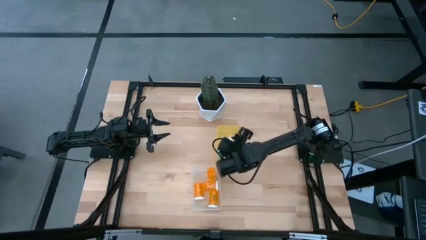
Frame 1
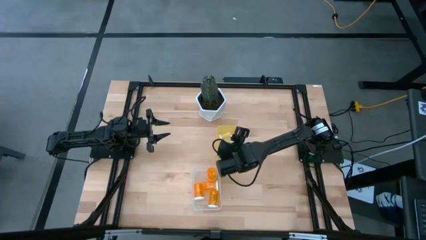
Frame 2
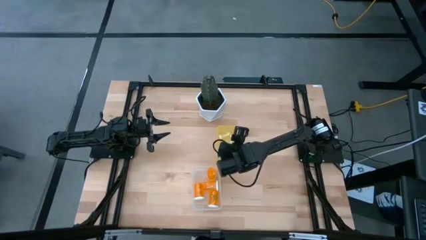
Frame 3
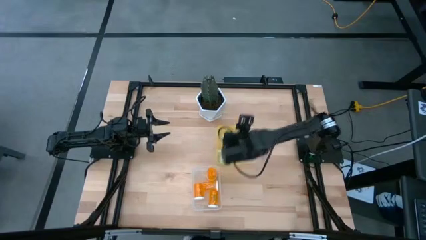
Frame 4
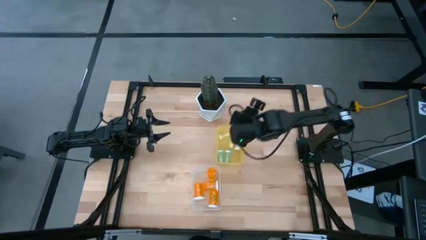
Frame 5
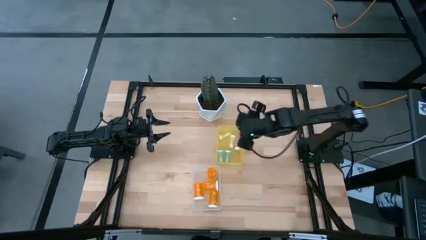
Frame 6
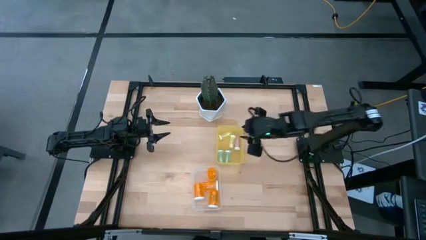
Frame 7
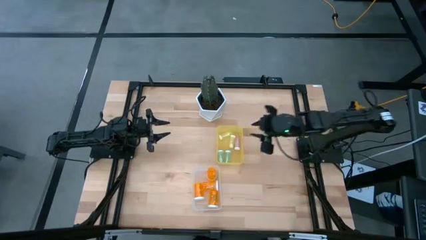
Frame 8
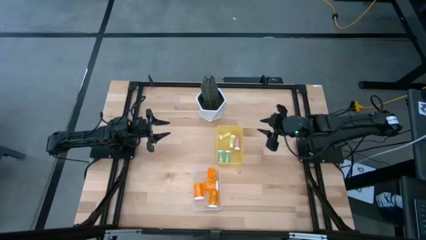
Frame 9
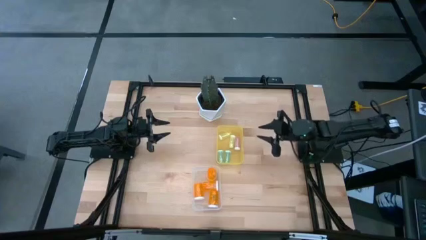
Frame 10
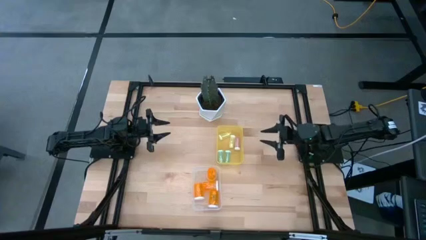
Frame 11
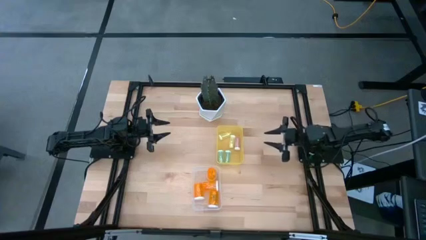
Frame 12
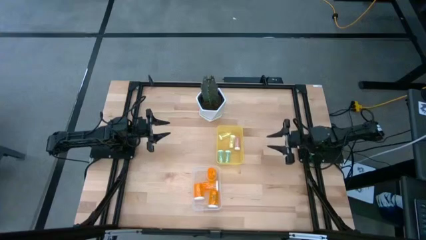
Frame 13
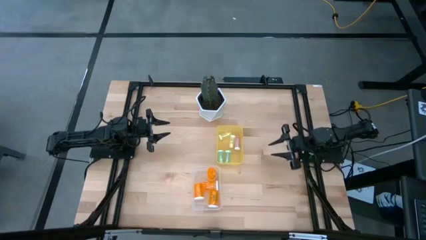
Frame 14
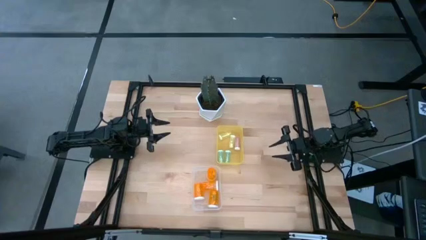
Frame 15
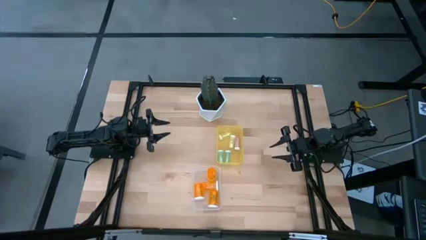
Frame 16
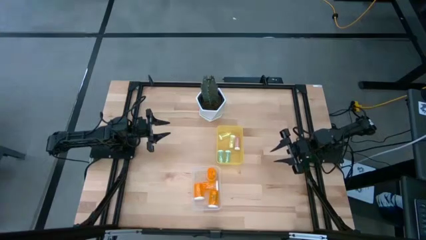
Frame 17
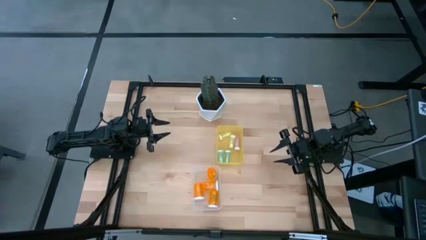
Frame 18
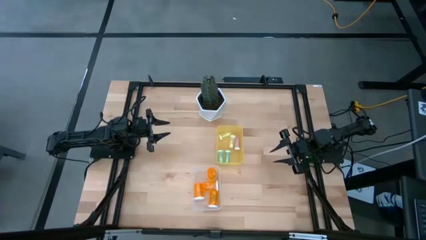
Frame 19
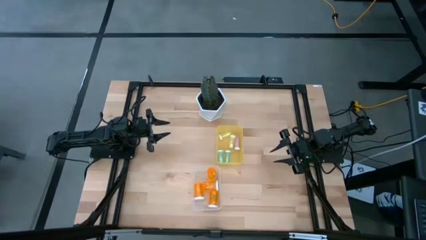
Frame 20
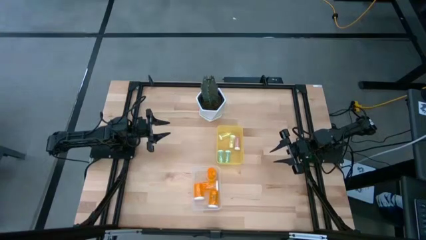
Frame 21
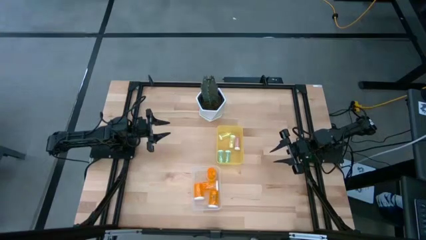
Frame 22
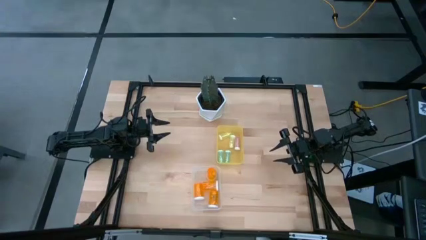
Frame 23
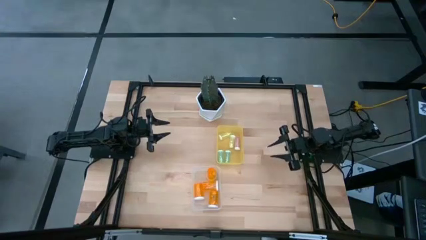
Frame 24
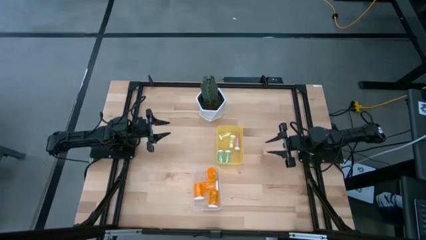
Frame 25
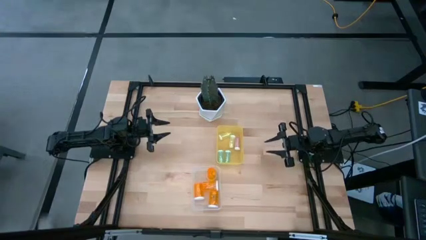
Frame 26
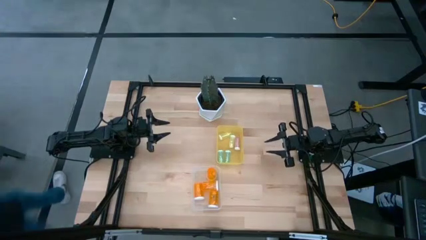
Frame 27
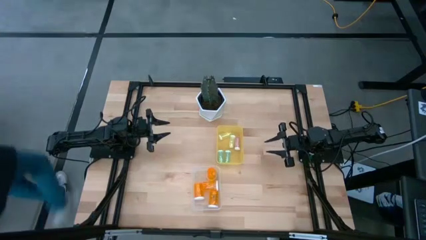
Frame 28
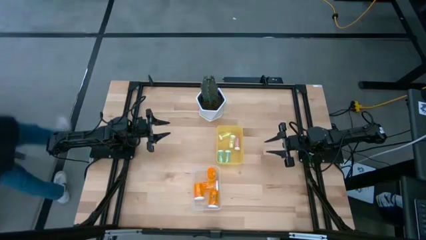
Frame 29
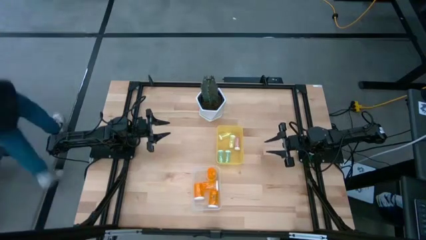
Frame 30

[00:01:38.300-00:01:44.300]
Task: Pick and place medicine bottles into bin by pill shape (circle, oval)
Return to Home Position

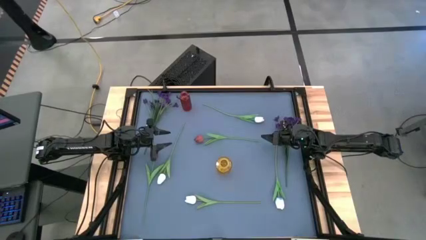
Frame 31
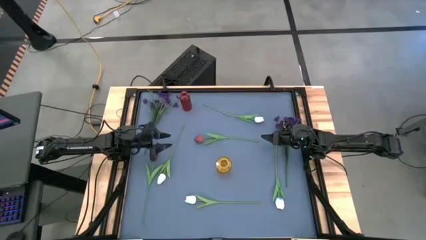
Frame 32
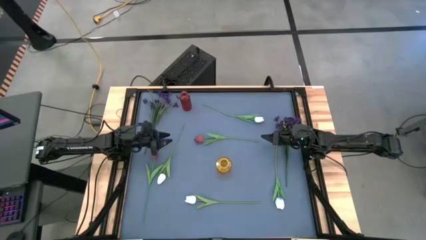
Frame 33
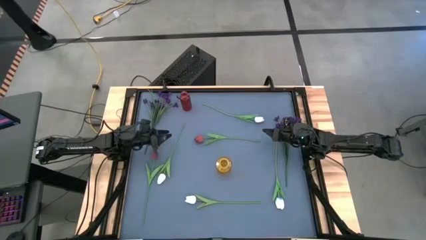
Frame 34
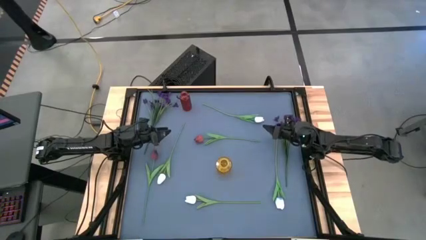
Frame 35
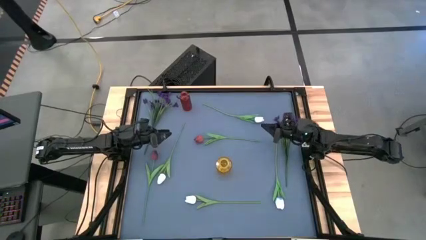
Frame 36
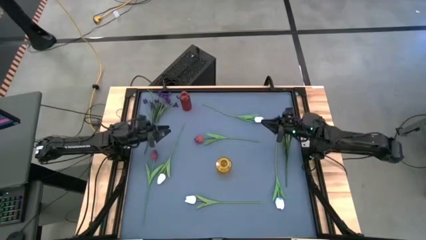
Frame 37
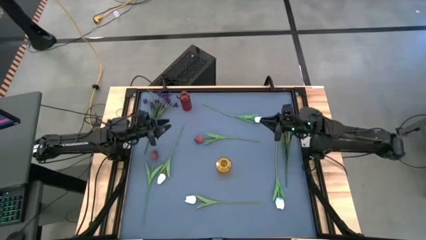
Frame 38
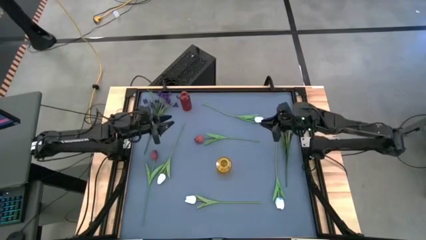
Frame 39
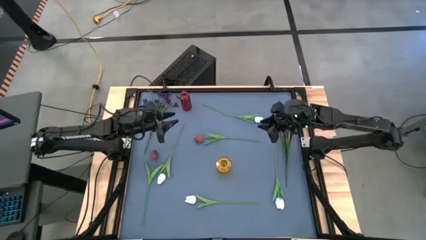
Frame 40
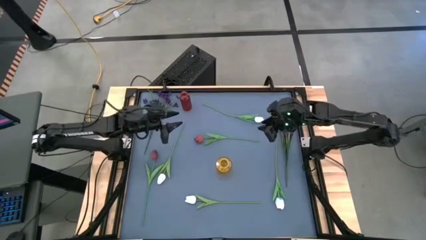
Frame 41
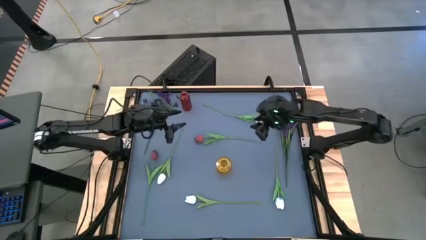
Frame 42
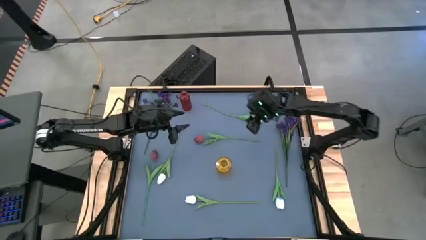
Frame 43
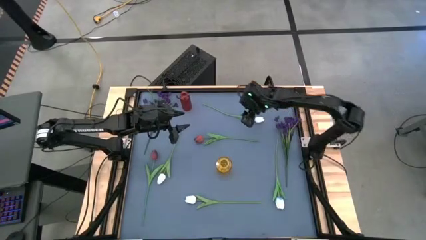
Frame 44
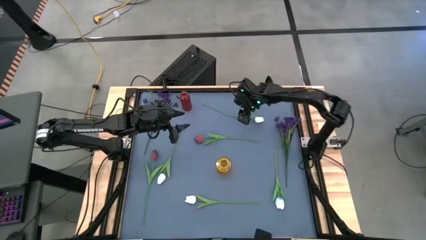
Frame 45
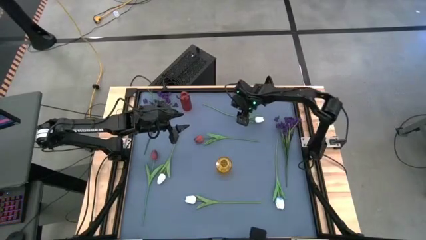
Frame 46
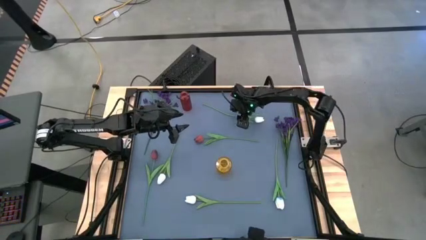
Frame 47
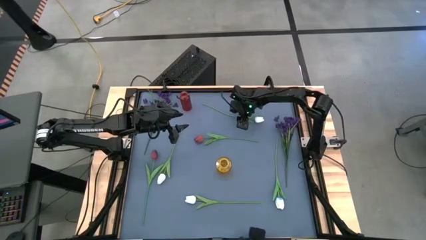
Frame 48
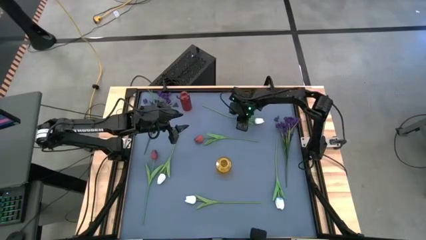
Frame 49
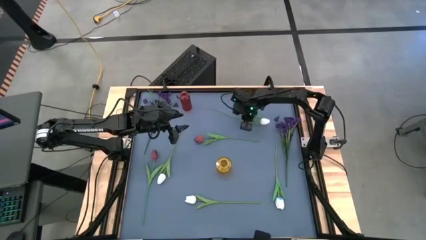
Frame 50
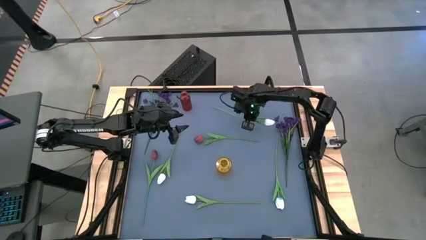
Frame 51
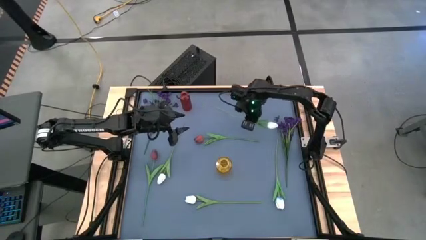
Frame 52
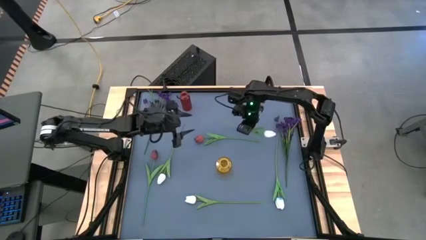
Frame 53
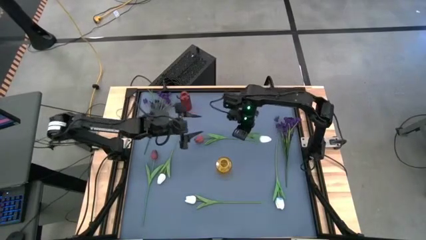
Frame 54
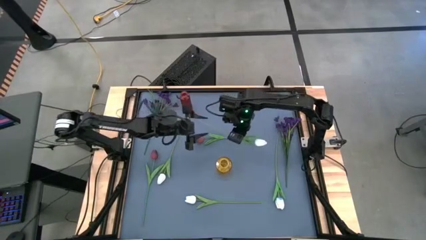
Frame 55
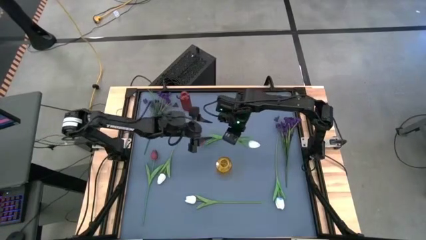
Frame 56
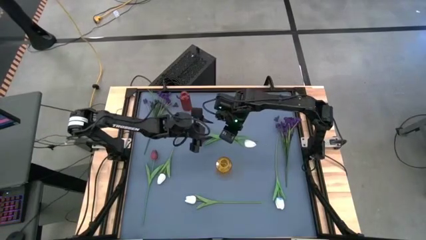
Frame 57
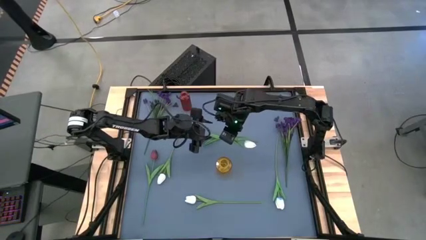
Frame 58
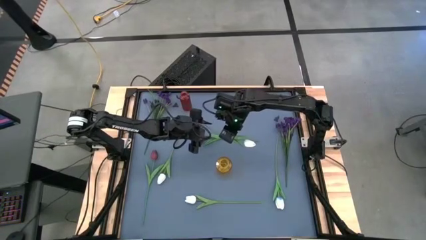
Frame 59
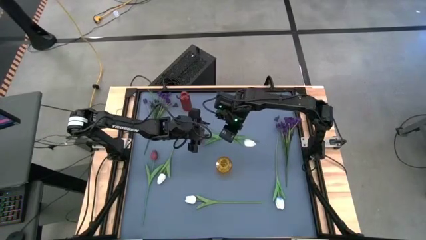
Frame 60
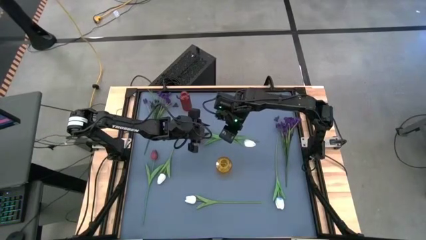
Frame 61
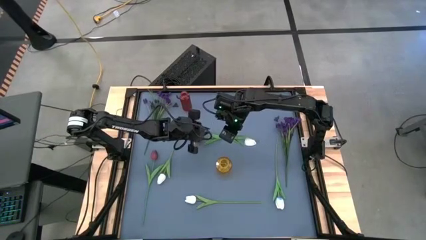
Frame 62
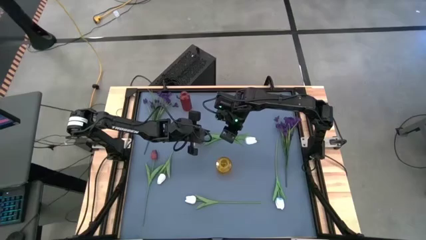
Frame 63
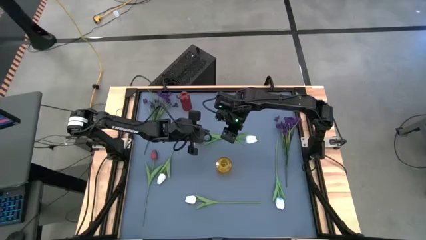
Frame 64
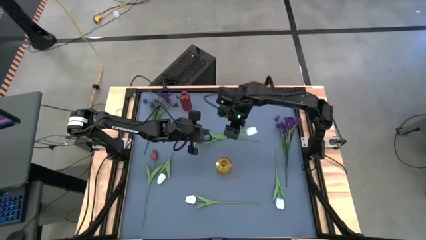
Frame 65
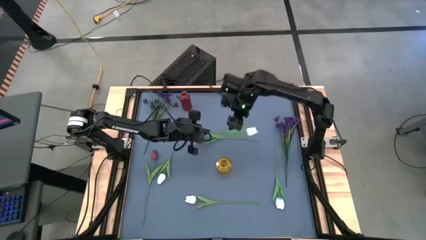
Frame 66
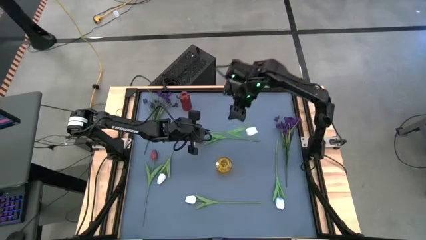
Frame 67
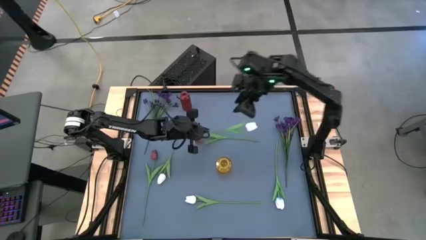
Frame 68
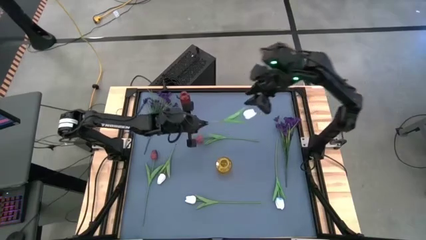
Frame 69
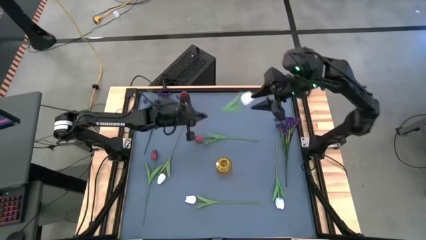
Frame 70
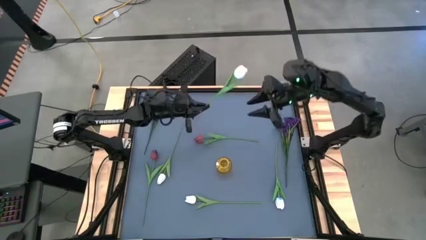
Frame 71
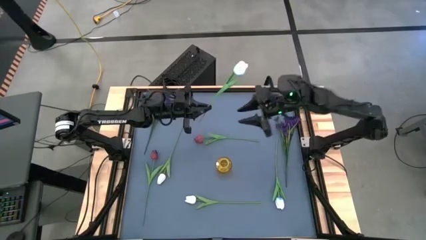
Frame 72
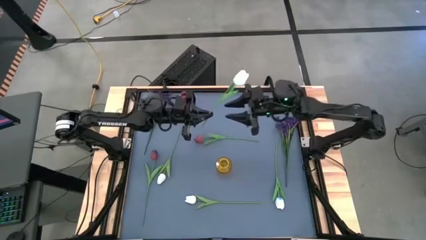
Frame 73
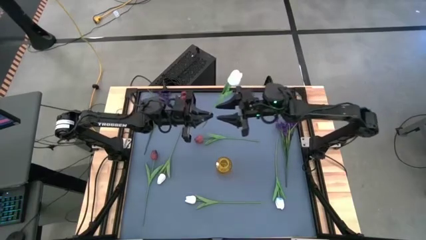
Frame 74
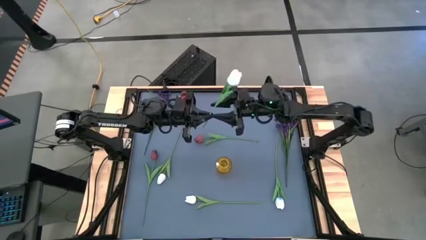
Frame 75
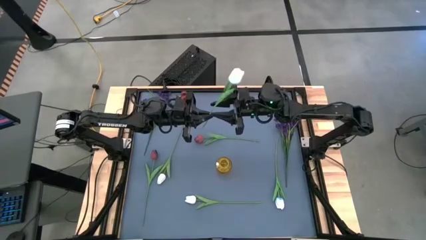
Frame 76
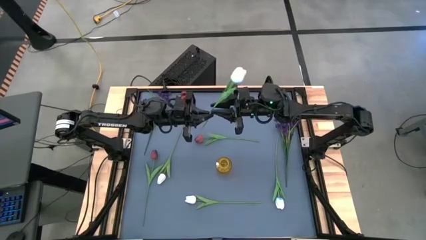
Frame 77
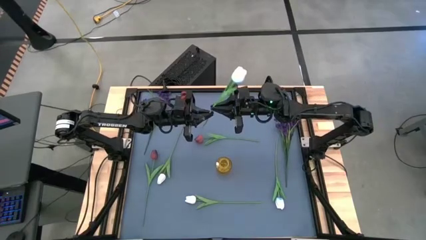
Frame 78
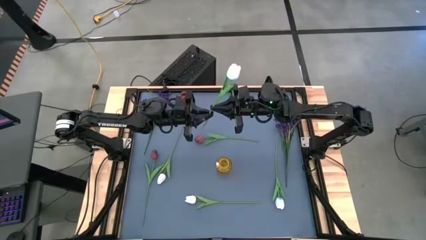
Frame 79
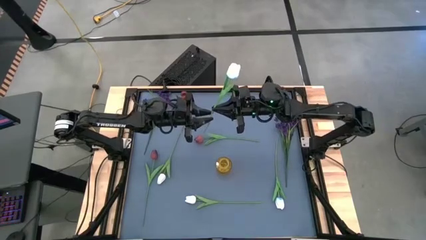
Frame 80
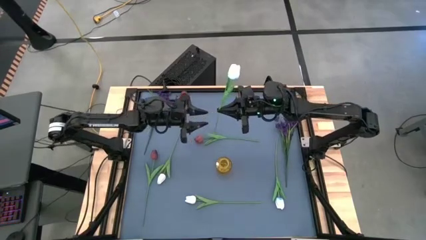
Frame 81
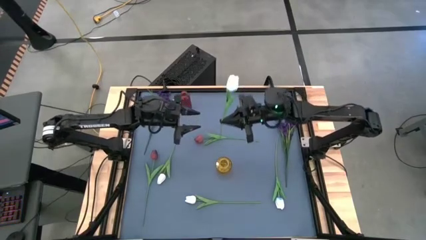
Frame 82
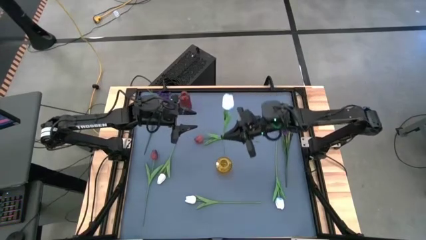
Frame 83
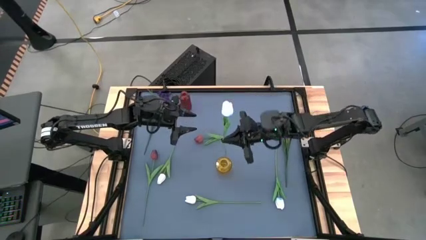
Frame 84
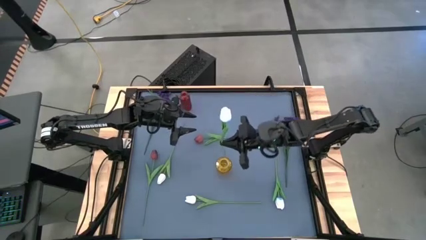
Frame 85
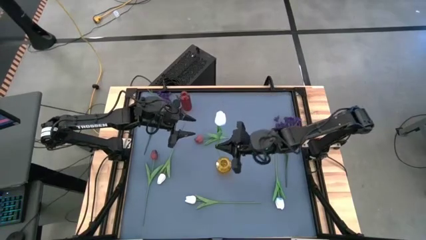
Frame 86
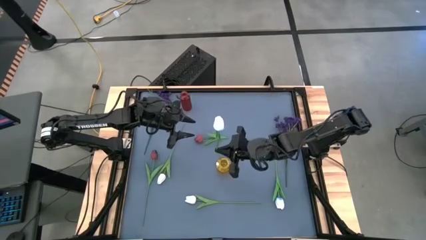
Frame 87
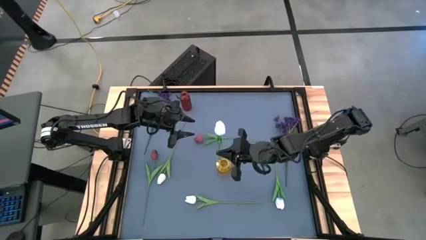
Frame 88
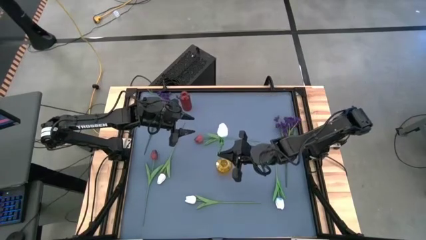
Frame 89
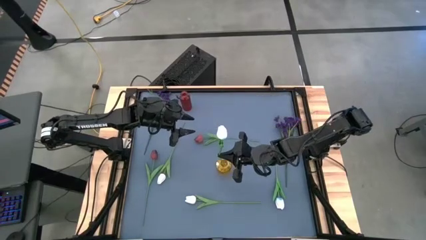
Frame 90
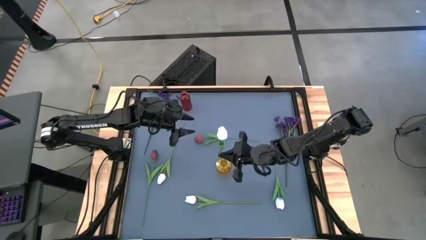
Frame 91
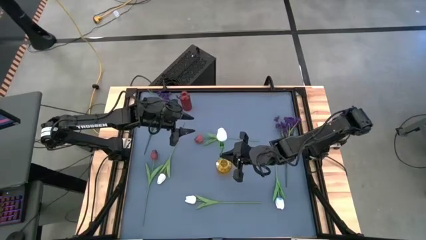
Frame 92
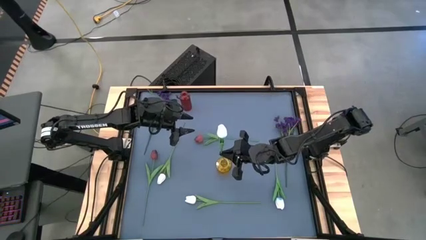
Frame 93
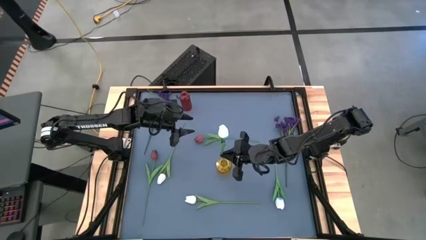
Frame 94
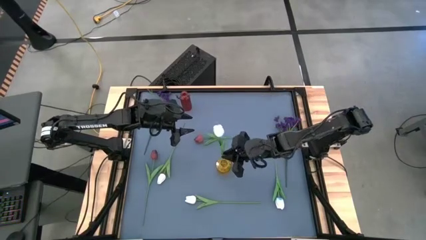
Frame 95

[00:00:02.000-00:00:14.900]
Task: Sort flowers into vase by color
Put the white flower into the yellow vase
